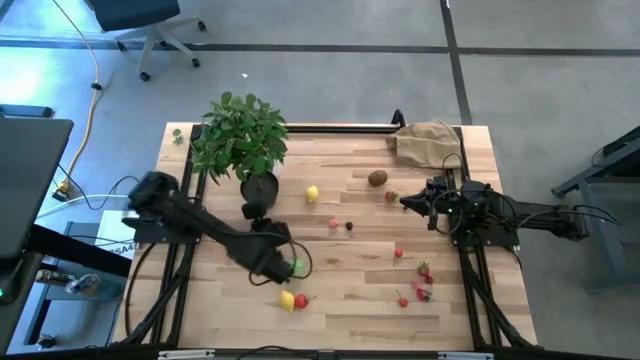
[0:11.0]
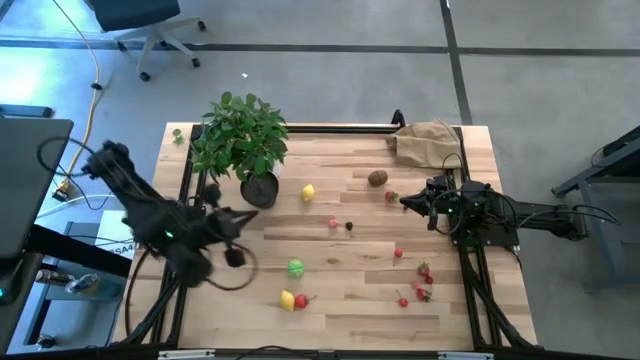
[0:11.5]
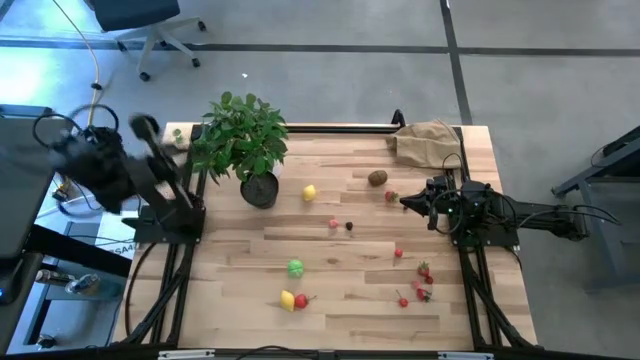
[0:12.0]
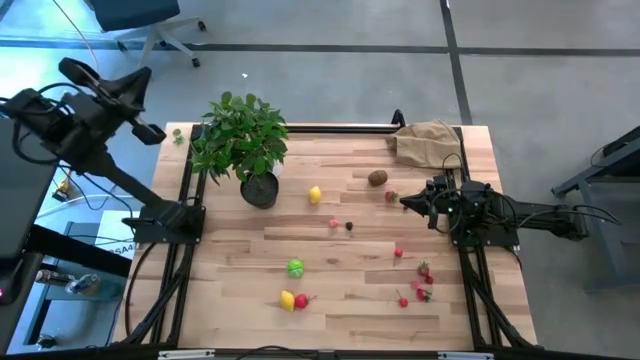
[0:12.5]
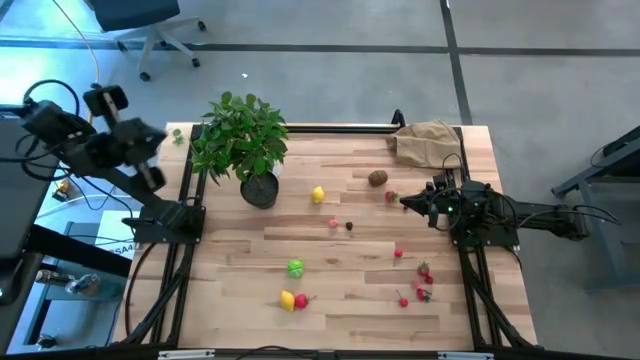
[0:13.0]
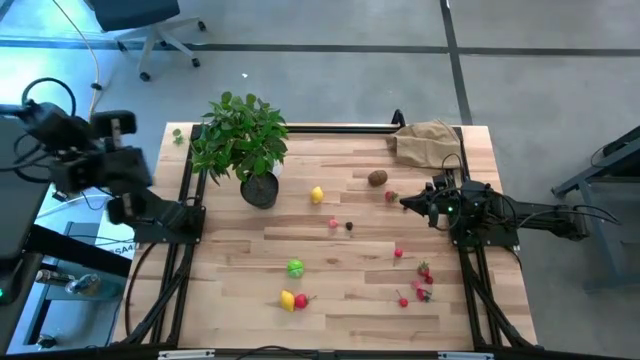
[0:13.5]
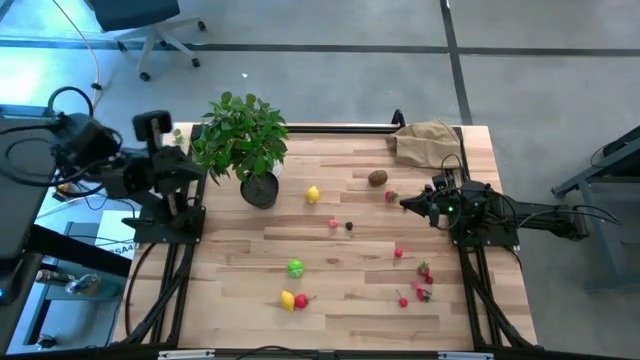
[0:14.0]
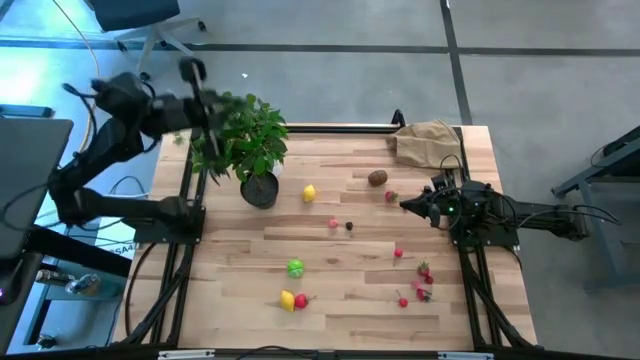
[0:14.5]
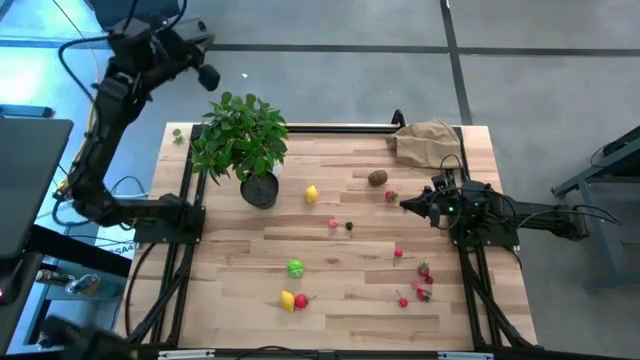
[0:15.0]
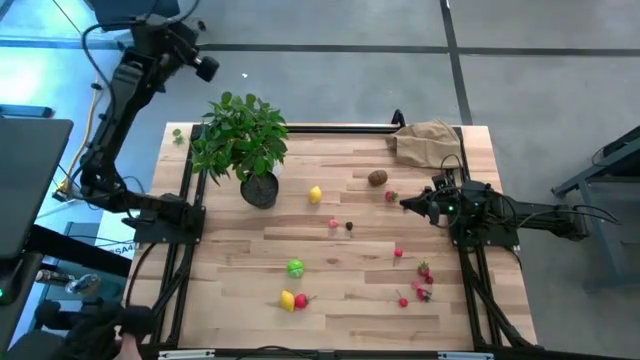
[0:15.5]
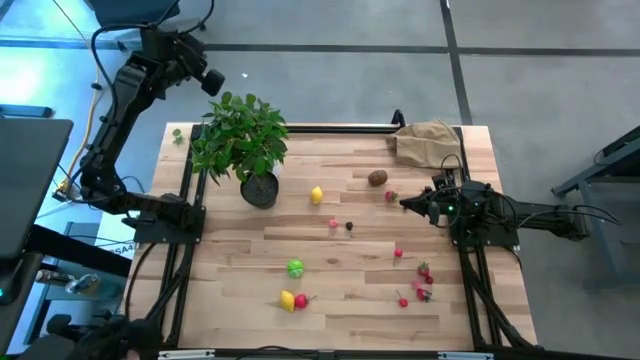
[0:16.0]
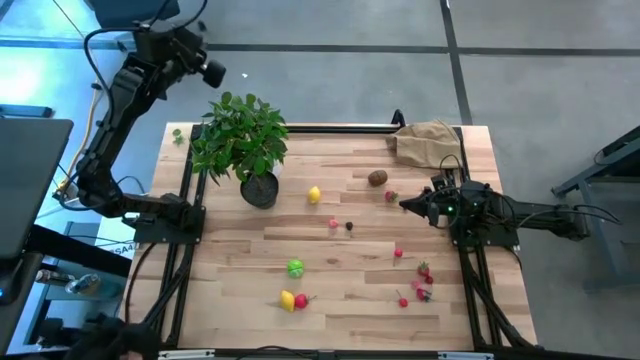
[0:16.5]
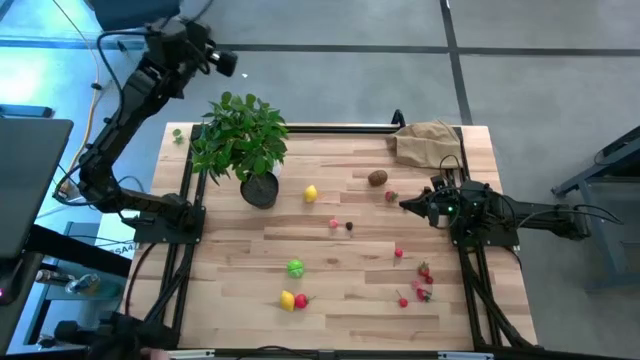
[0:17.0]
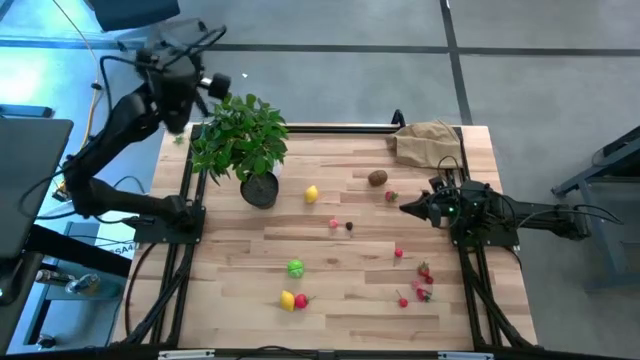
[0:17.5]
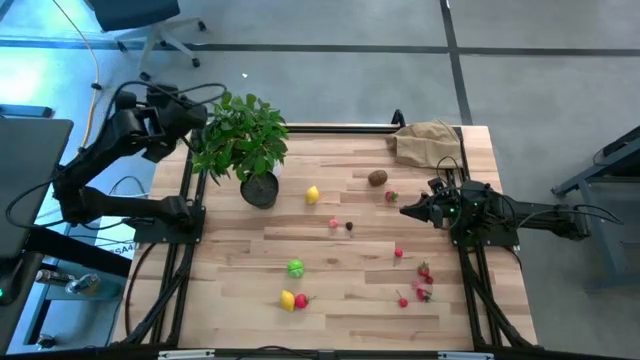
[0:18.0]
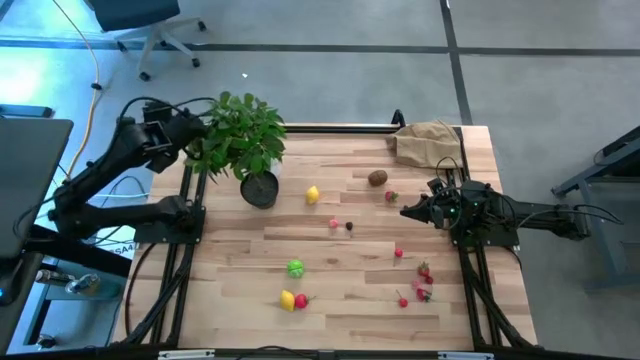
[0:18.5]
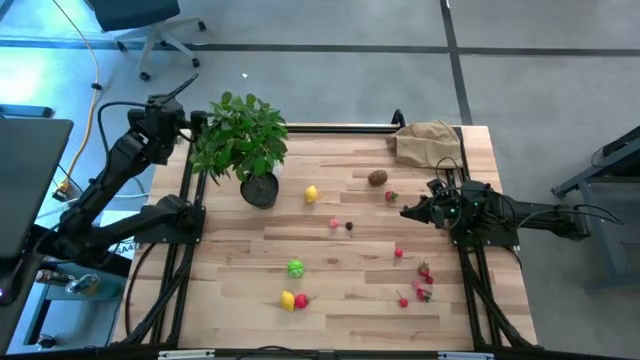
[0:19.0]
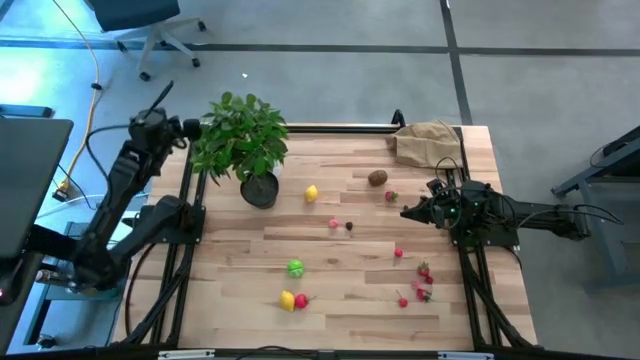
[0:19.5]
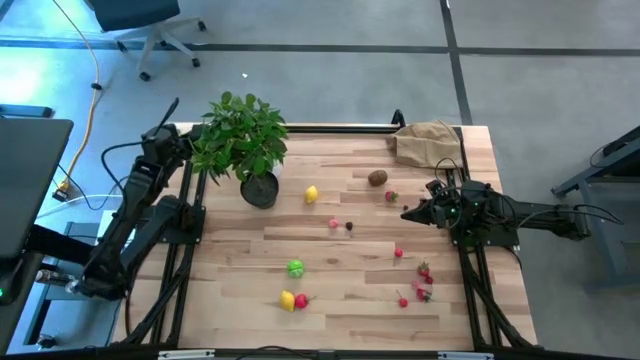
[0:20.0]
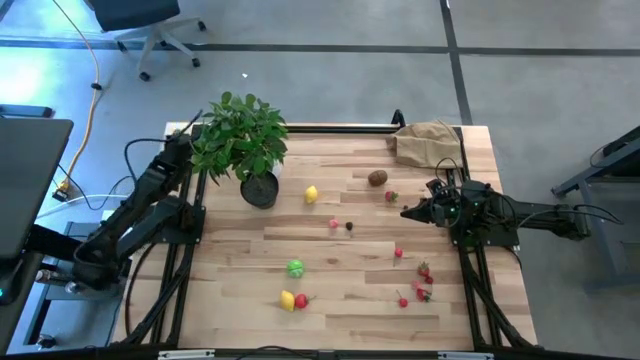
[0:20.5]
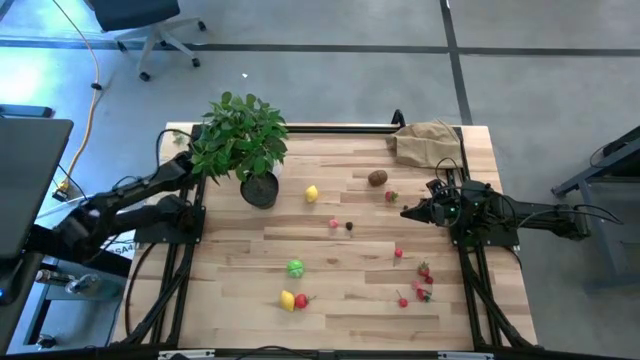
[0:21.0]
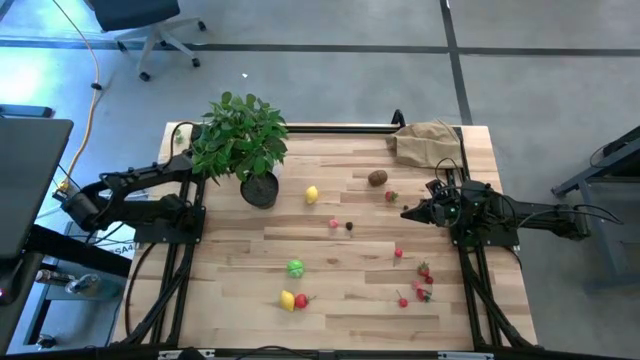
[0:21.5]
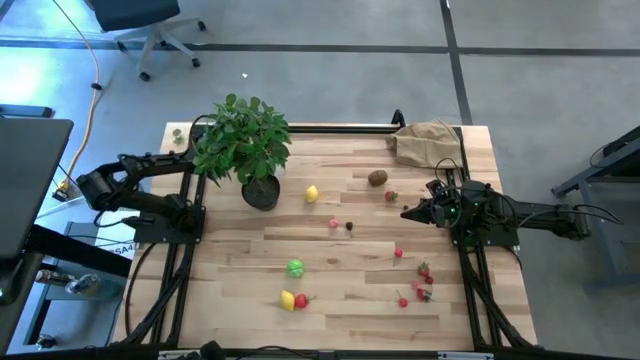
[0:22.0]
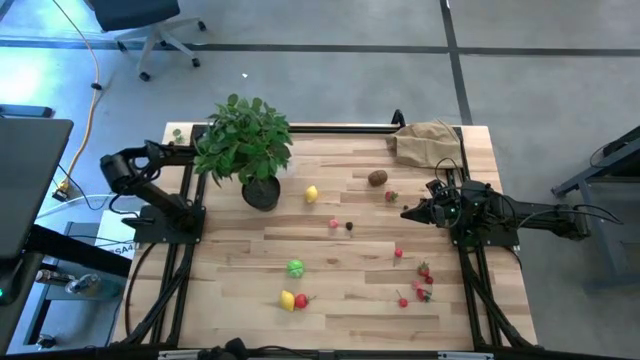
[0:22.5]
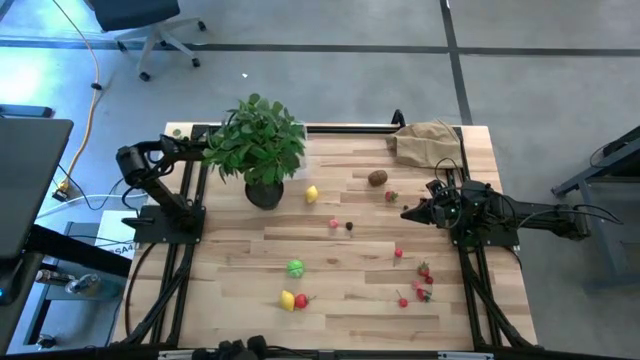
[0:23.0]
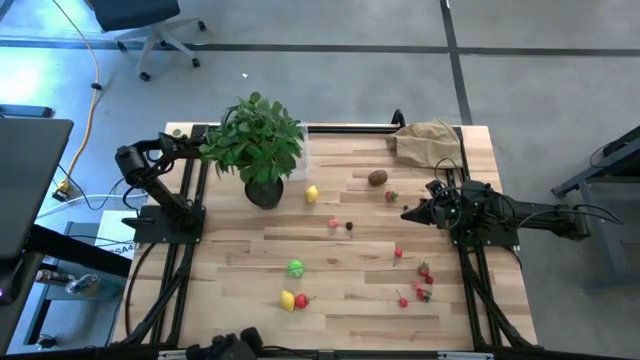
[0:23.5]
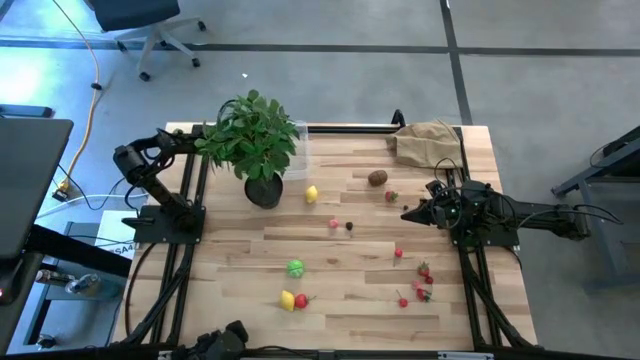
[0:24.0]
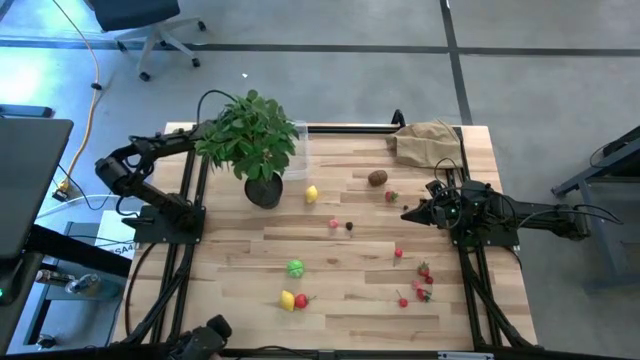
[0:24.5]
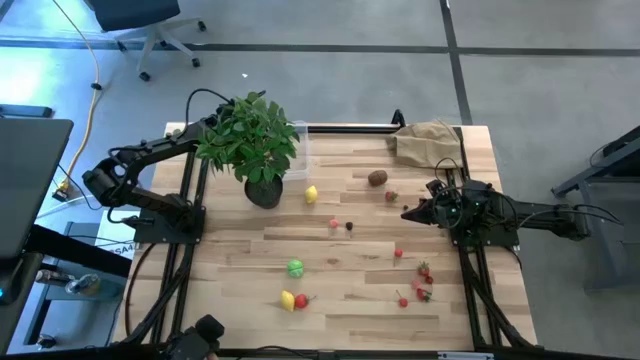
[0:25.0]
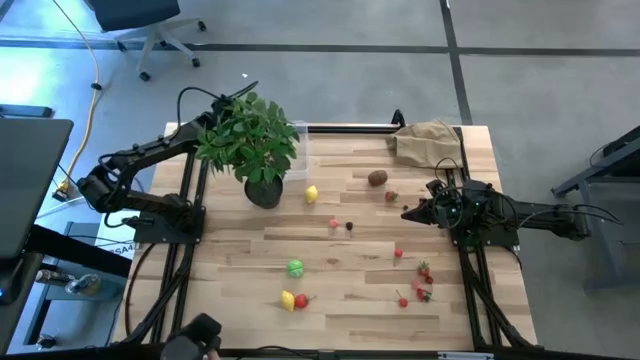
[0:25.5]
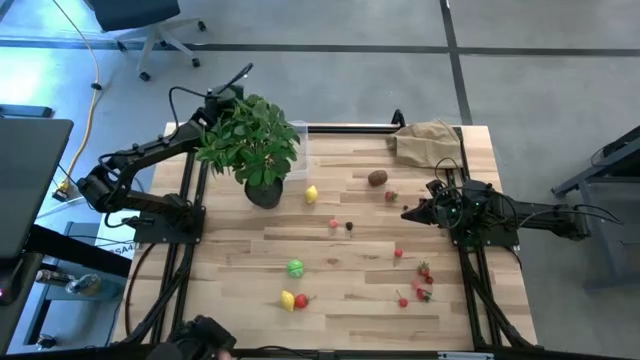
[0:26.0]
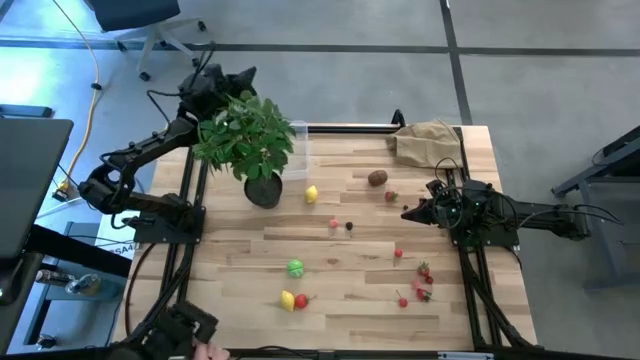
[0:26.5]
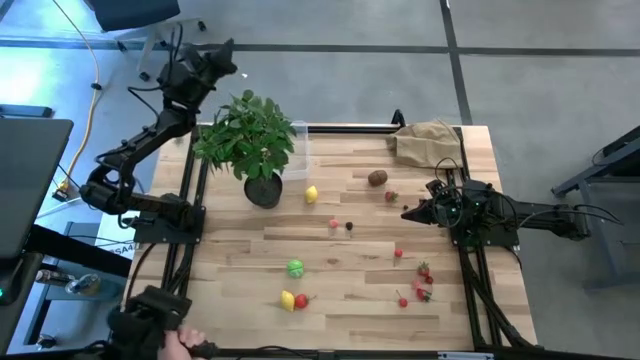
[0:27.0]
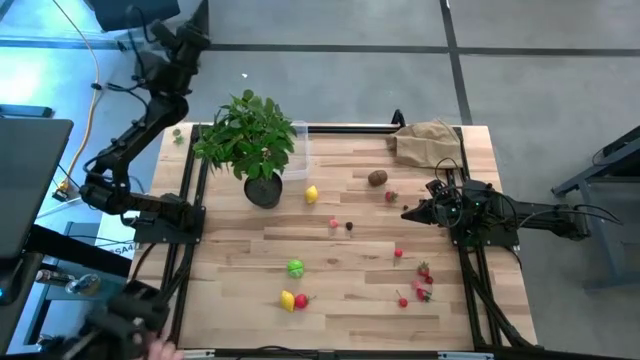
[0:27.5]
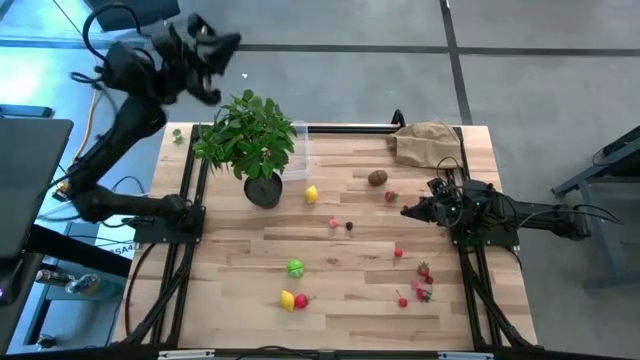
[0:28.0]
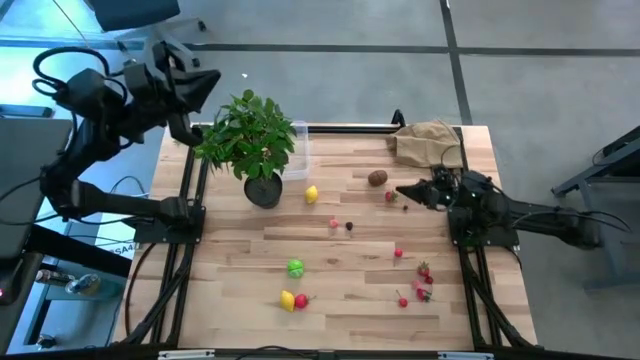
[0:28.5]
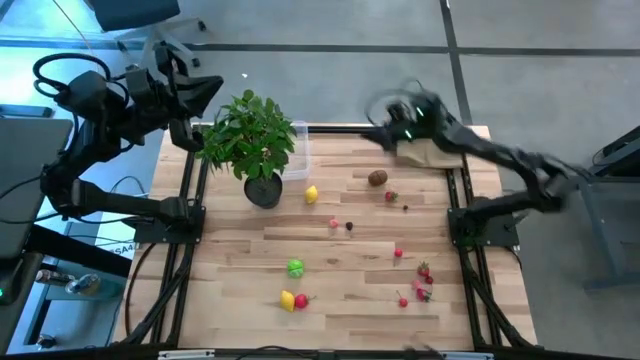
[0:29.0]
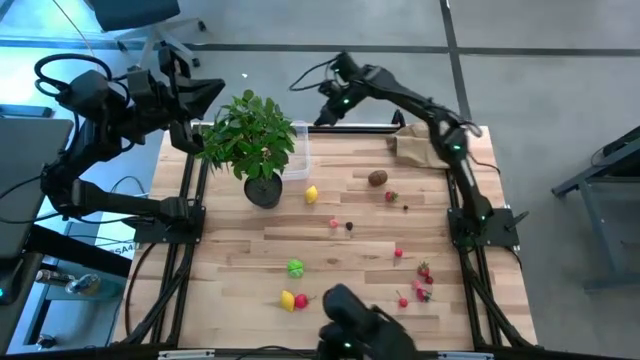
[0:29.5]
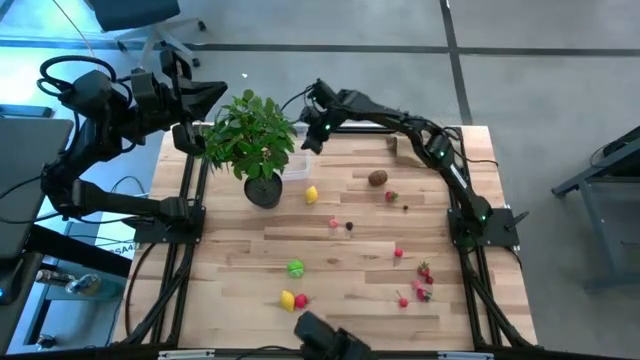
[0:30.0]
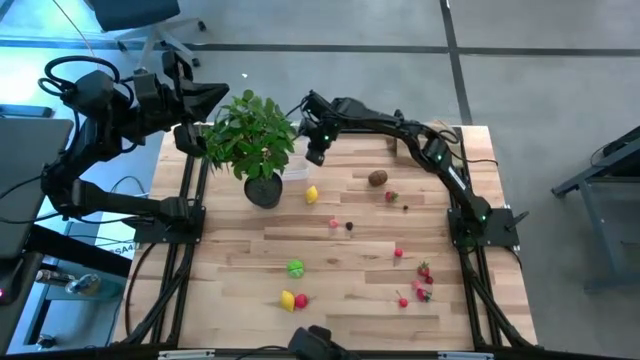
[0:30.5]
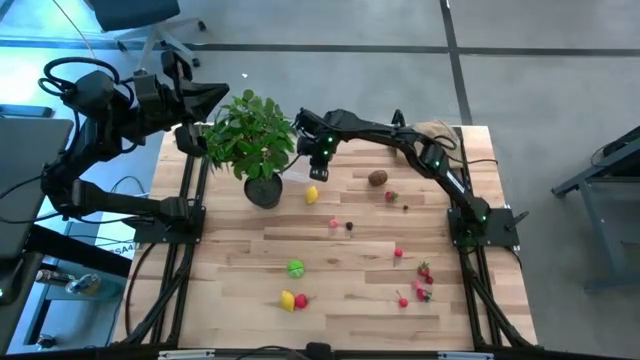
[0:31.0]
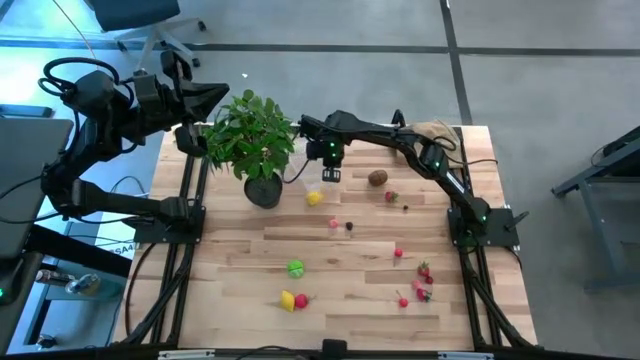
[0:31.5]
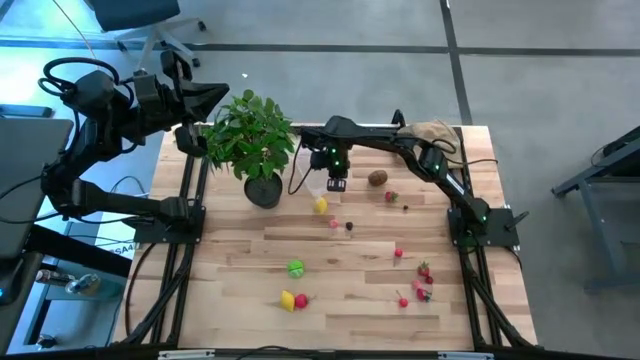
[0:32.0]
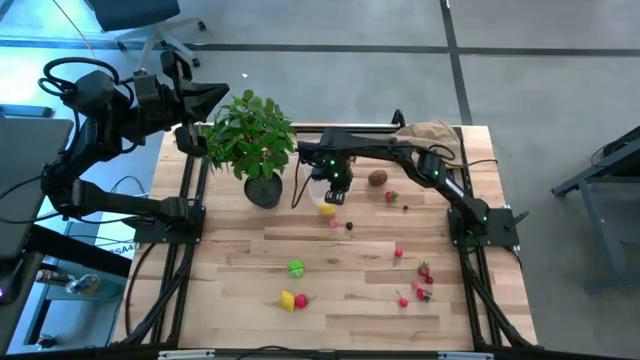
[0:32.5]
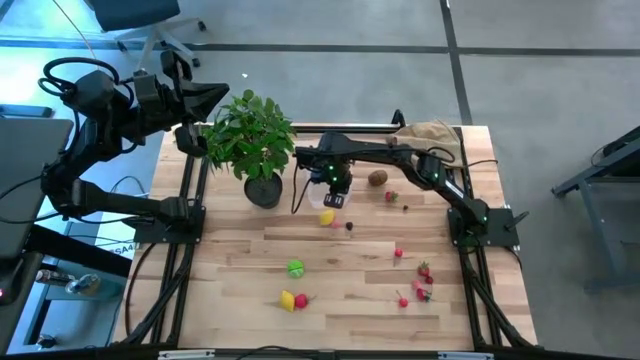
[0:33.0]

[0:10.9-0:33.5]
Task: Pick and placing Produce into tupperware
Move the transparent bin to the top center of the table
